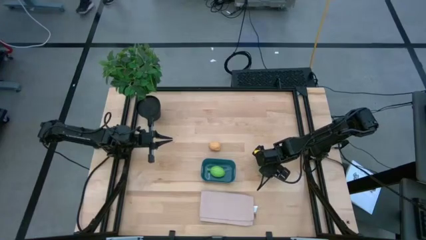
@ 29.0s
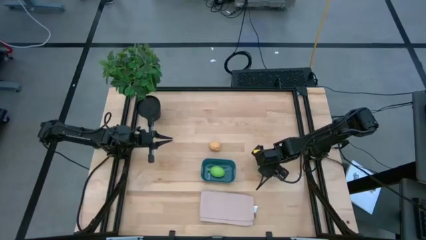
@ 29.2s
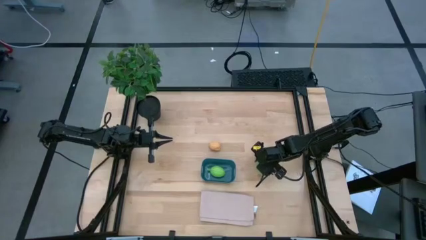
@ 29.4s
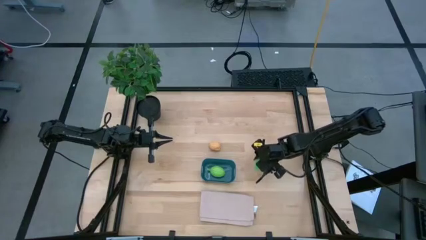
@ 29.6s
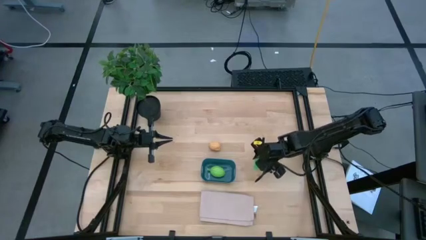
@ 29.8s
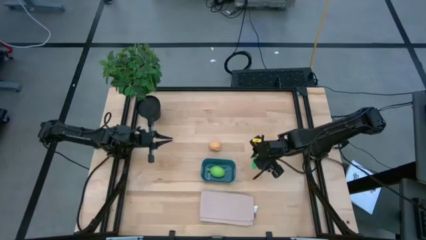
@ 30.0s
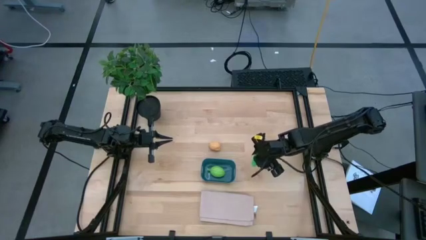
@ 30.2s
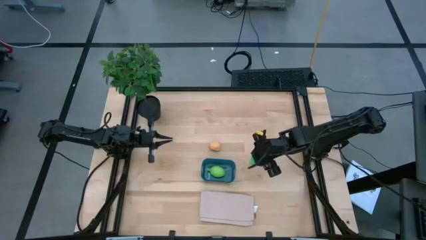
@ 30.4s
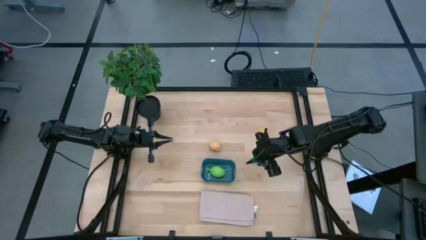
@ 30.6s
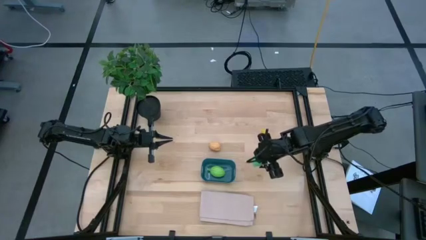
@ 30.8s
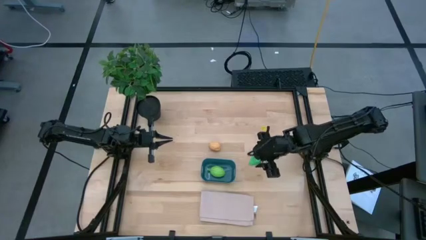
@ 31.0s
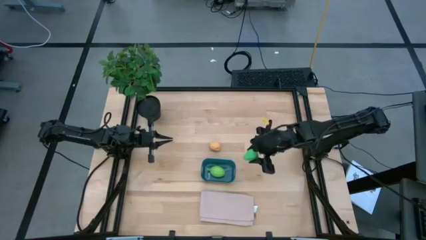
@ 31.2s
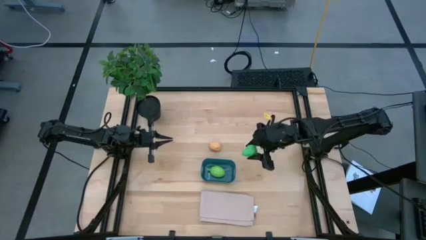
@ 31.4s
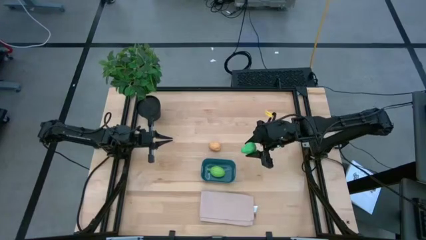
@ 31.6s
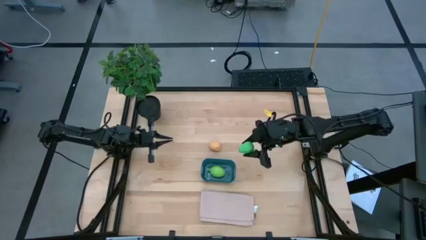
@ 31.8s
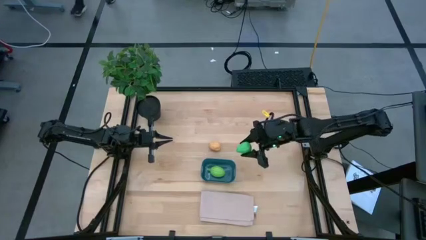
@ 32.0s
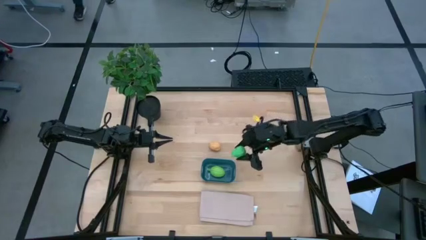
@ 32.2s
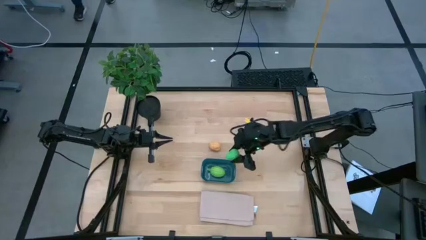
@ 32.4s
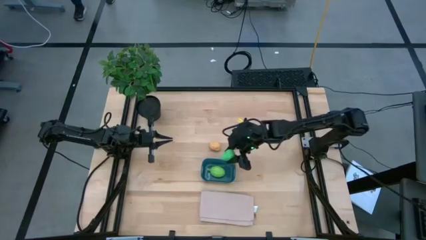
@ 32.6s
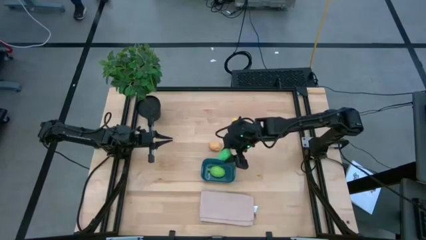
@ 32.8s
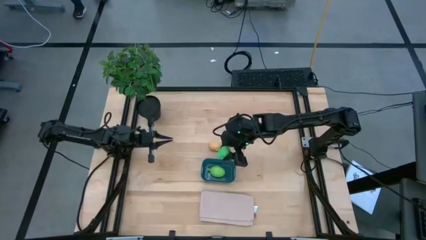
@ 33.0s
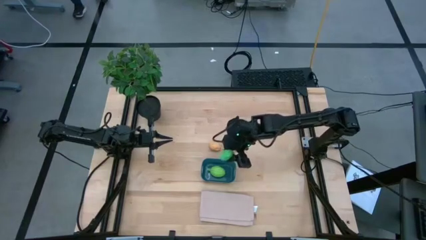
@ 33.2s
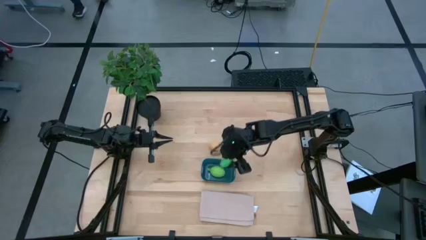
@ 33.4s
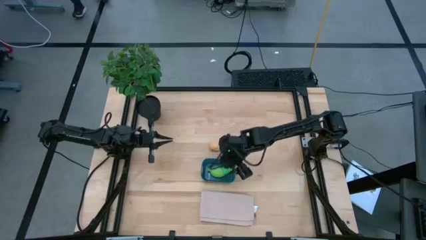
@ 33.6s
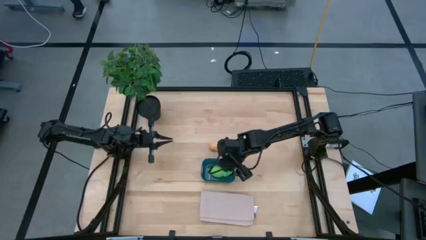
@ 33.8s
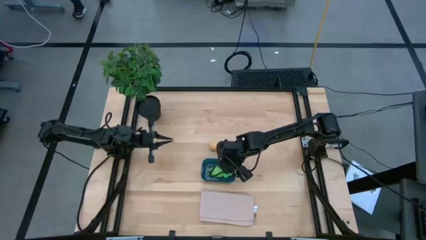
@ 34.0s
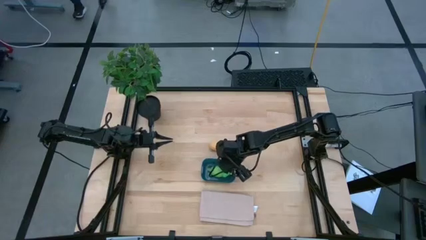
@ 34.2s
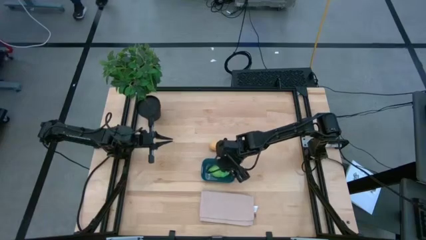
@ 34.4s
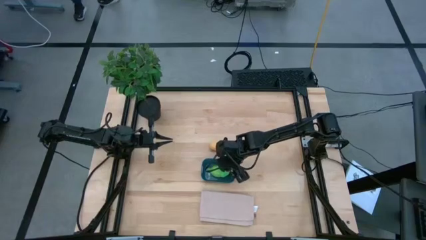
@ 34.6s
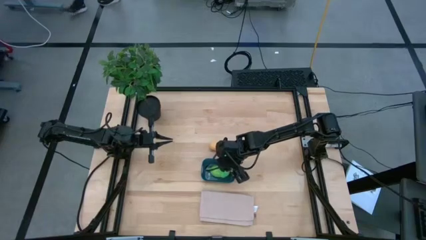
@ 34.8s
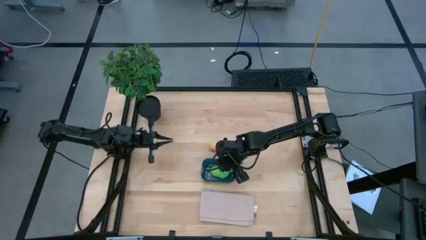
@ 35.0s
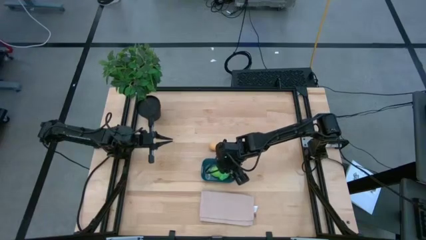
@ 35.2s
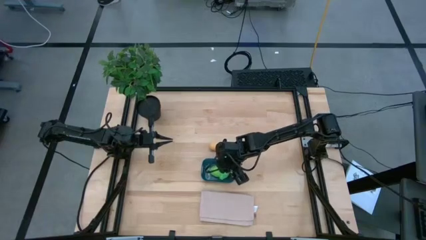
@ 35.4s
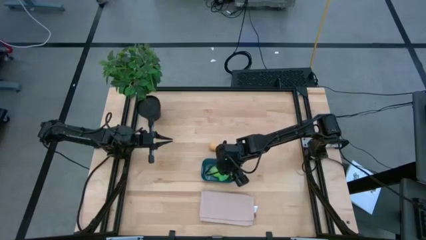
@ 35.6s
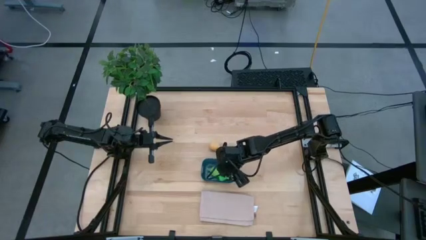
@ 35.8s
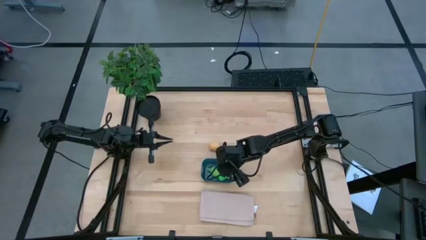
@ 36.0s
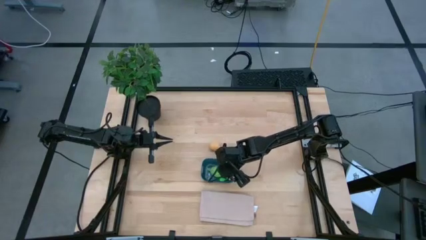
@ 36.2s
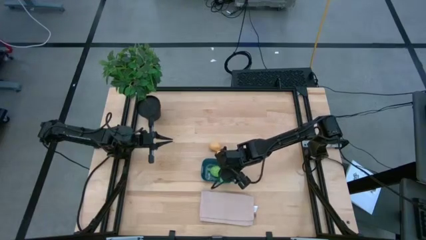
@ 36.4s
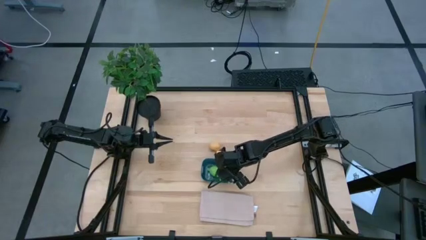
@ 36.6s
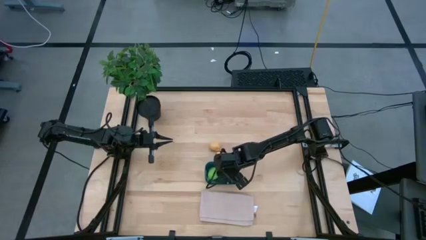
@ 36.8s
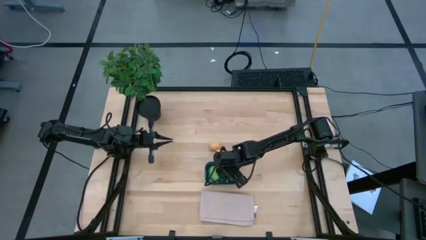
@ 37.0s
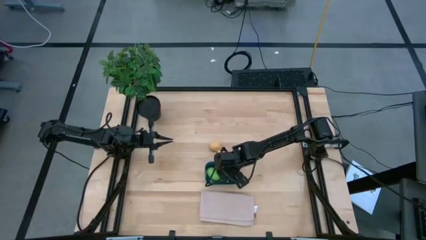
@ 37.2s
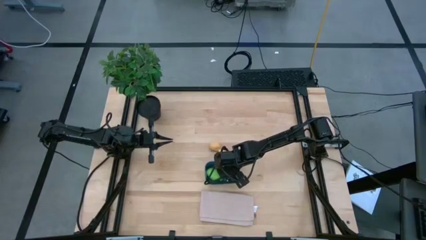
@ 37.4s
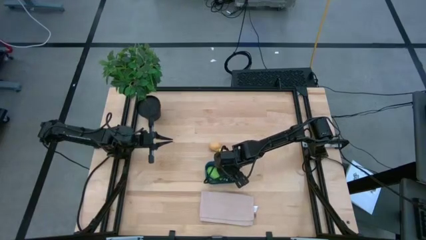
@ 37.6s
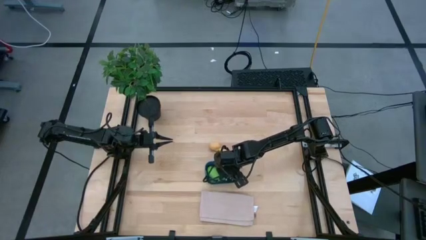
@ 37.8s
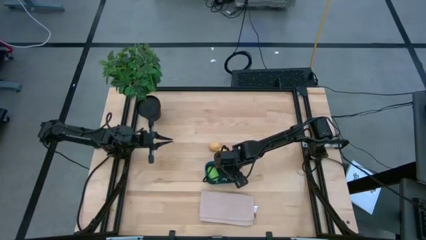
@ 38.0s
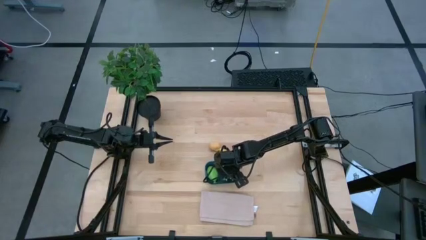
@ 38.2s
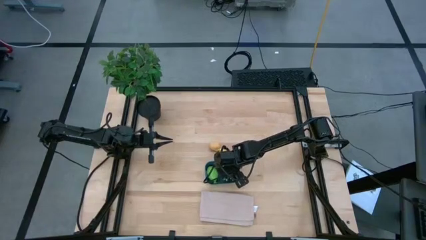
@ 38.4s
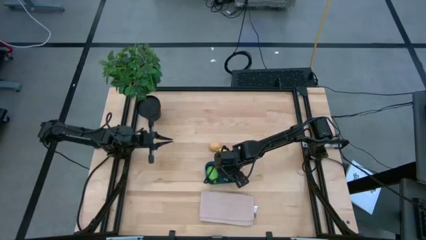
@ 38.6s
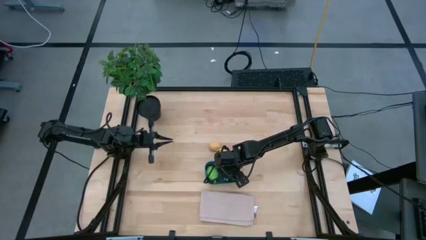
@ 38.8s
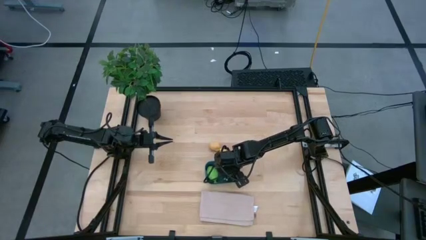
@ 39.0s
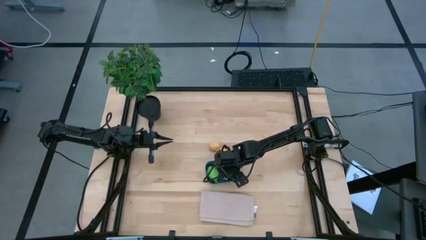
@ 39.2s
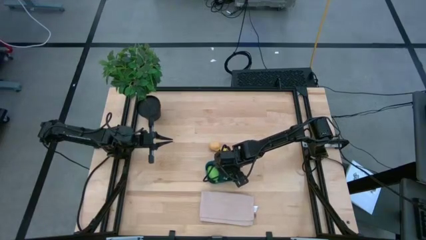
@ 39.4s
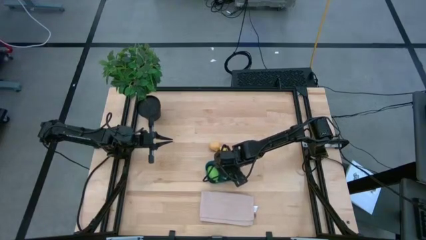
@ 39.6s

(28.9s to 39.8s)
Task: Pick and placing Produce into tupperware
Put the green pear into the blue bin

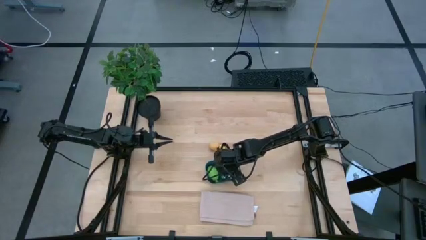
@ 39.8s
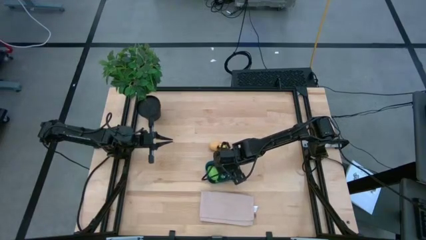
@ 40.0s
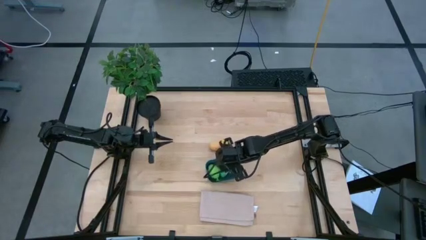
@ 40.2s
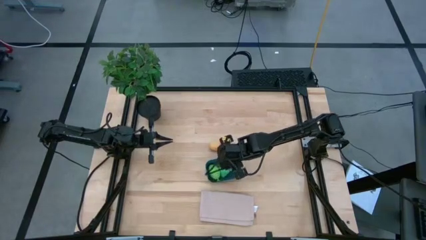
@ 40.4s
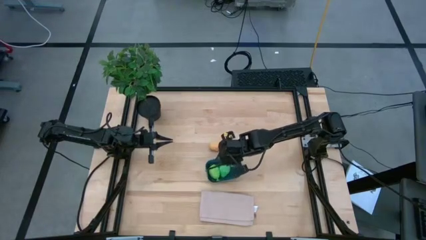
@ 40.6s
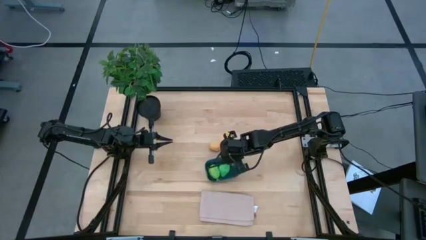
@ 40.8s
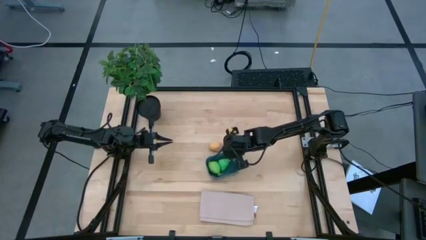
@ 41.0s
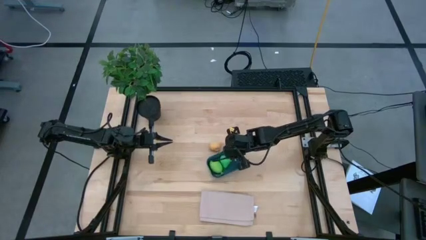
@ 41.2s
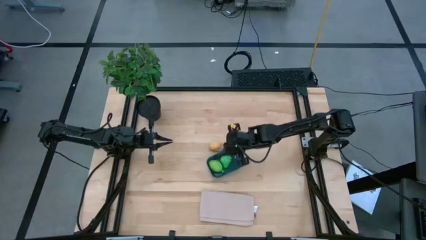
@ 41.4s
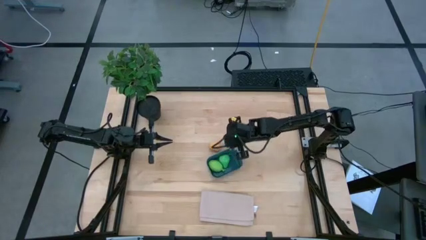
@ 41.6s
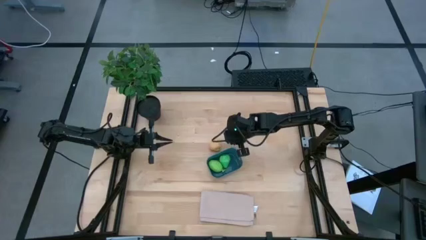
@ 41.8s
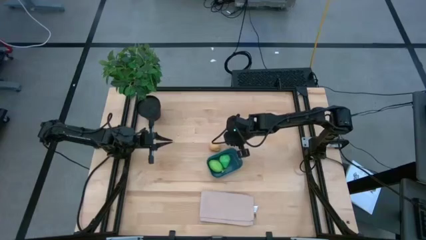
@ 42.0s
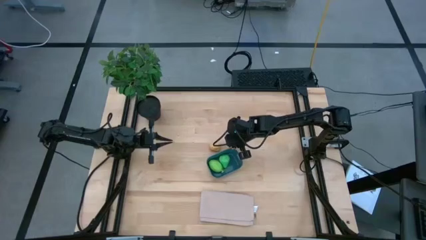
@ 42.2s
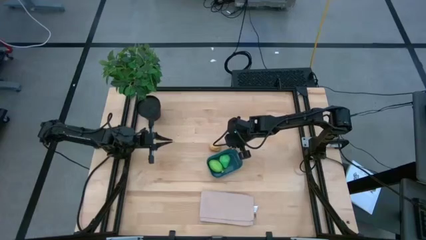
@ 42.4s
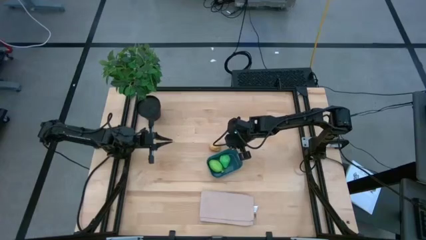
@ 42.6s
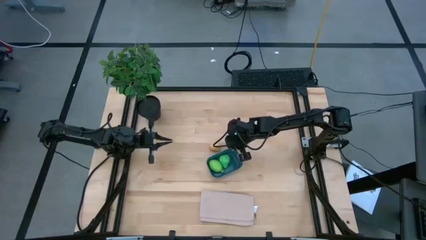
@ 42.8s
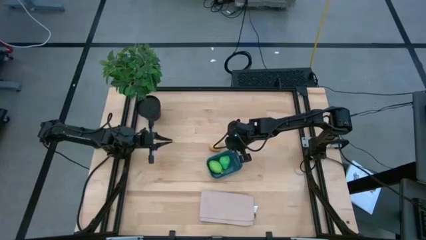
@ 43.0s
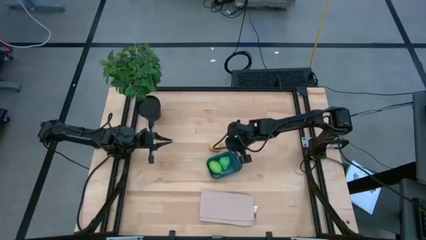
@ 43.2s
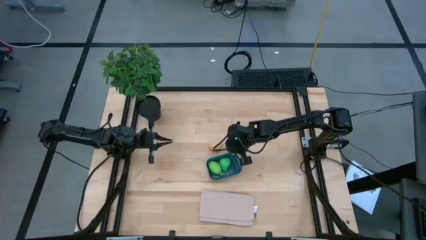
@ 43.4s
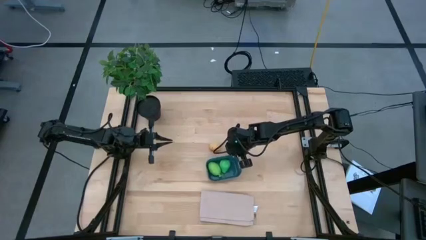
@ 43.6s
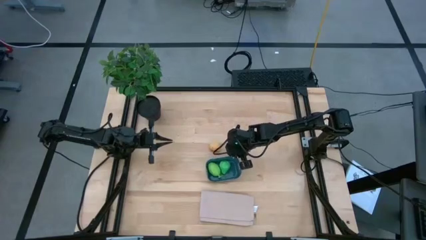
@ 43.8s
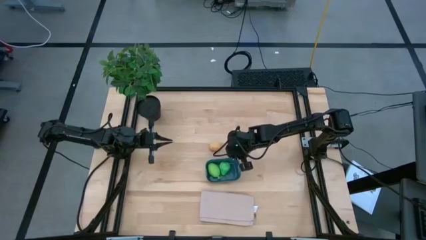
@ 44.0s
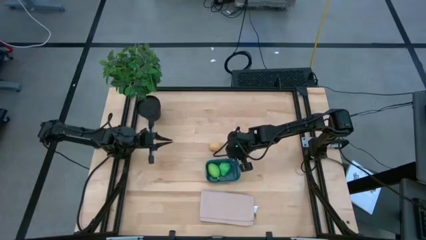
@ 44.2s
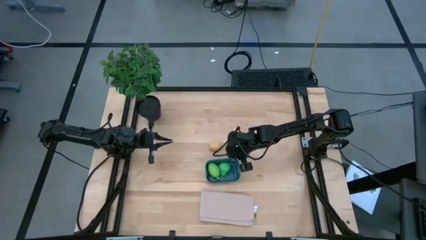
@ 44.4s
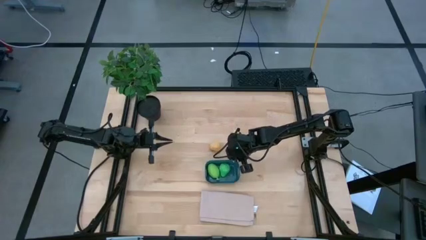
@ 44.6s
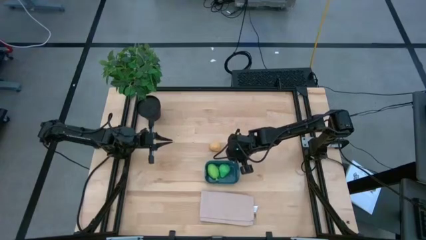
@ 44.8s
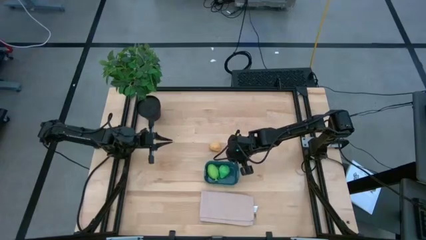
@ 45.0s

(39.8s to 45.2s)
Adjust the blue bin
